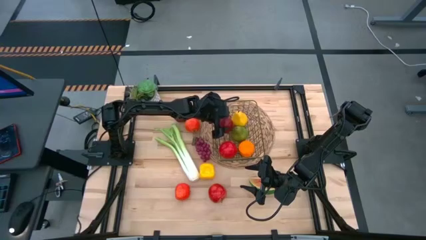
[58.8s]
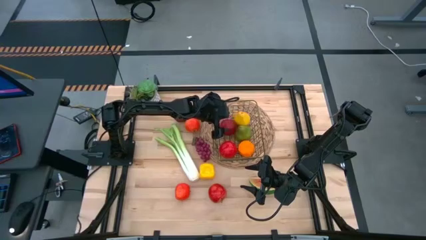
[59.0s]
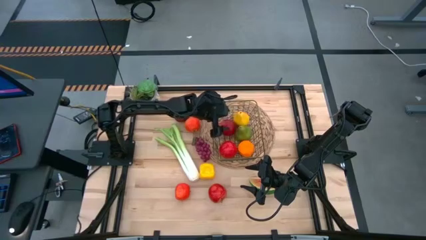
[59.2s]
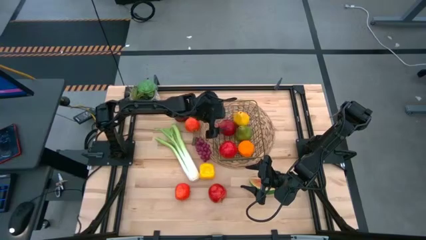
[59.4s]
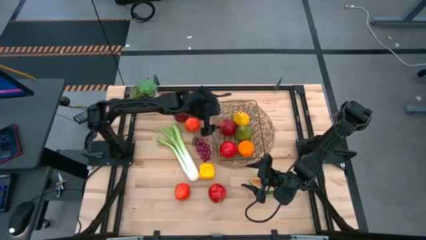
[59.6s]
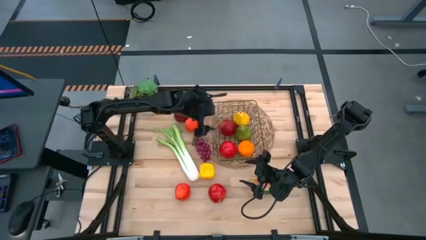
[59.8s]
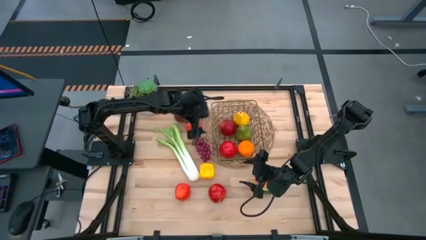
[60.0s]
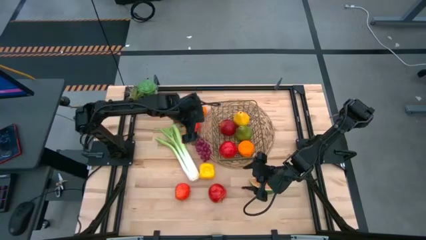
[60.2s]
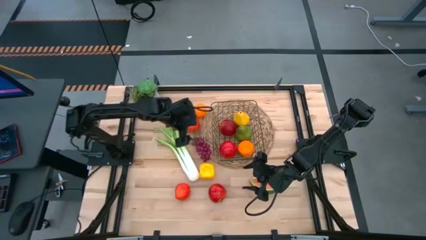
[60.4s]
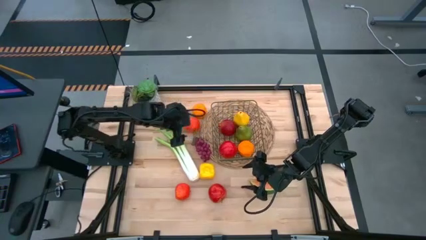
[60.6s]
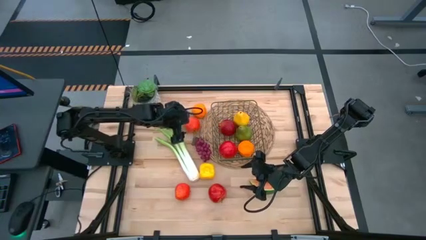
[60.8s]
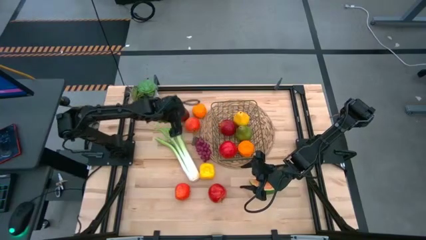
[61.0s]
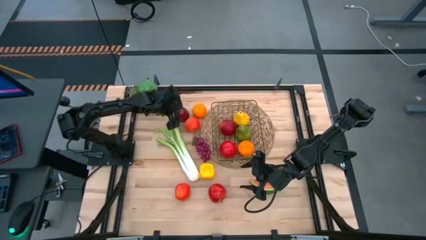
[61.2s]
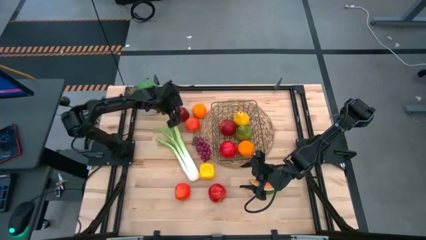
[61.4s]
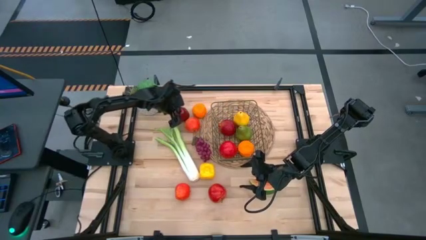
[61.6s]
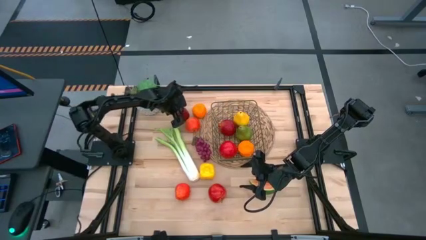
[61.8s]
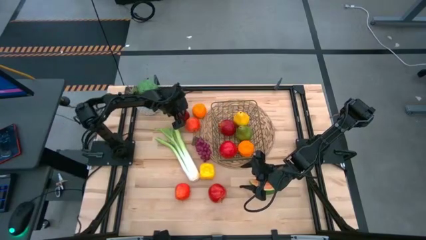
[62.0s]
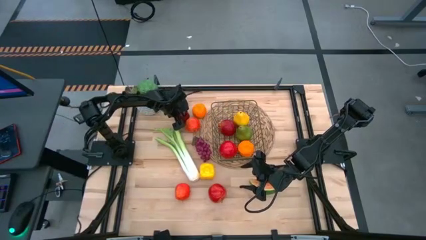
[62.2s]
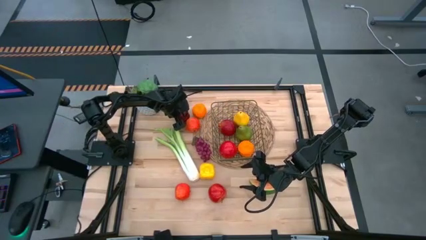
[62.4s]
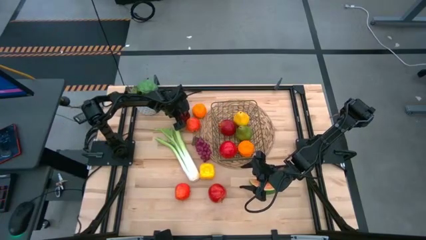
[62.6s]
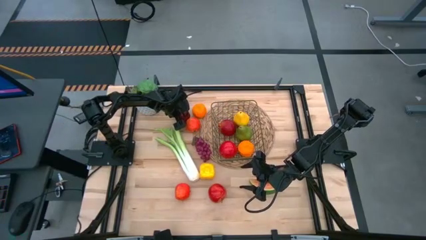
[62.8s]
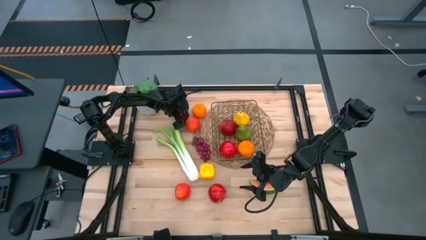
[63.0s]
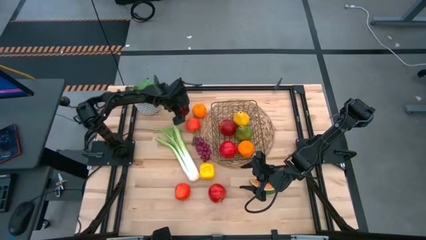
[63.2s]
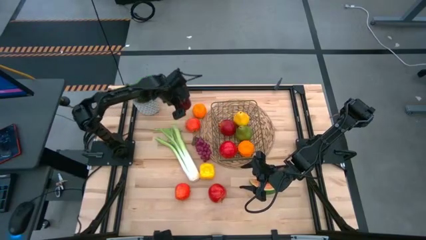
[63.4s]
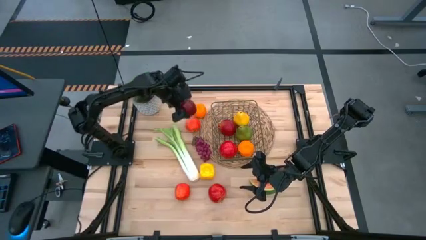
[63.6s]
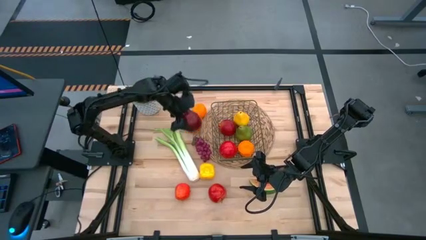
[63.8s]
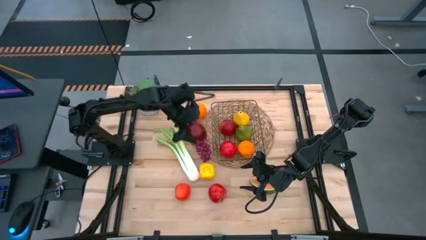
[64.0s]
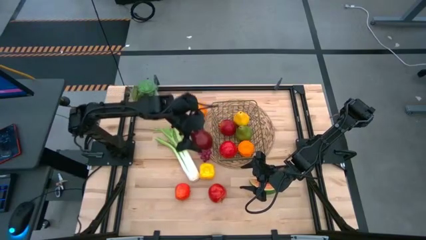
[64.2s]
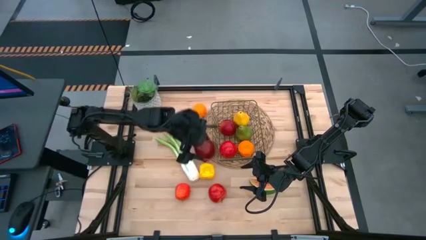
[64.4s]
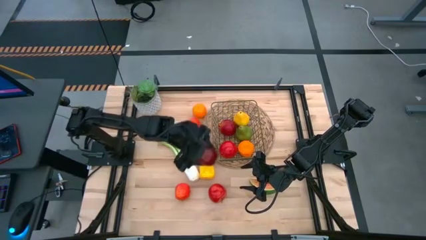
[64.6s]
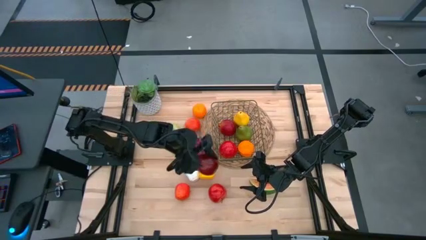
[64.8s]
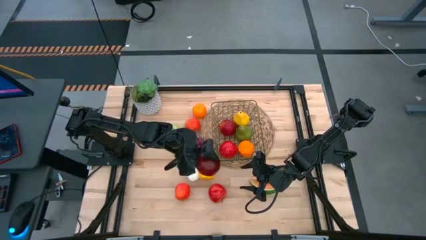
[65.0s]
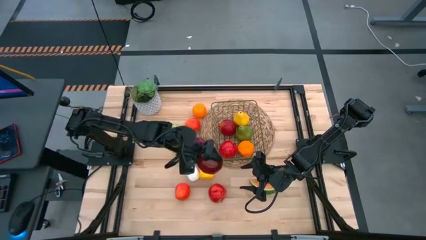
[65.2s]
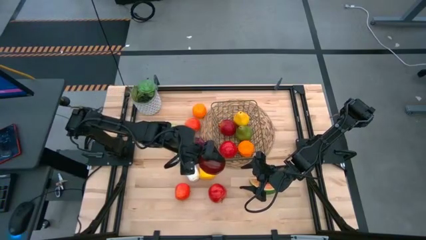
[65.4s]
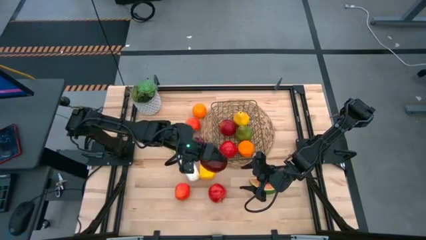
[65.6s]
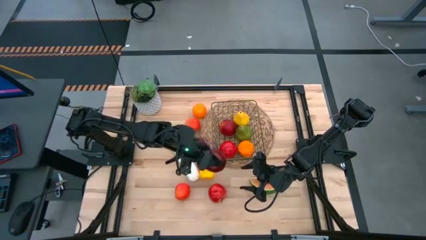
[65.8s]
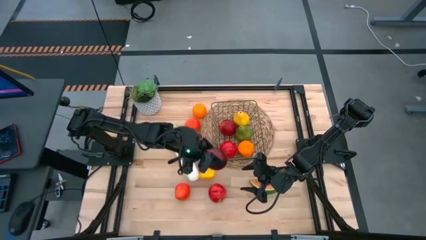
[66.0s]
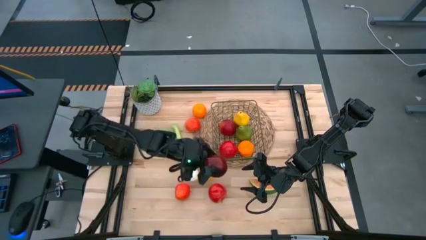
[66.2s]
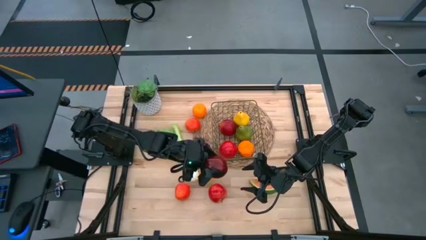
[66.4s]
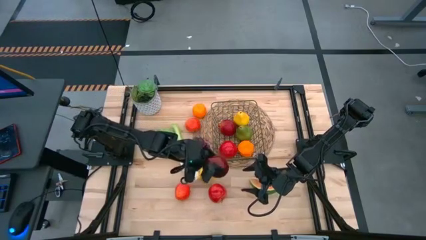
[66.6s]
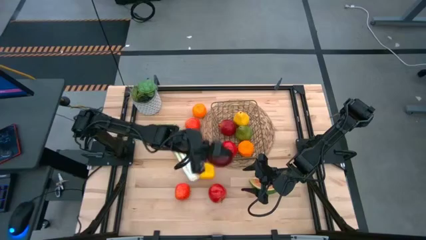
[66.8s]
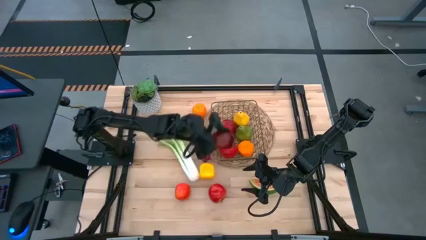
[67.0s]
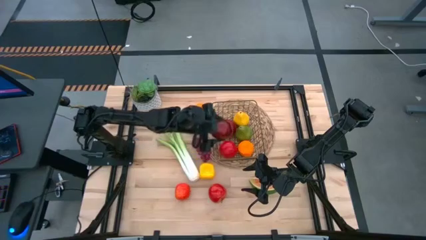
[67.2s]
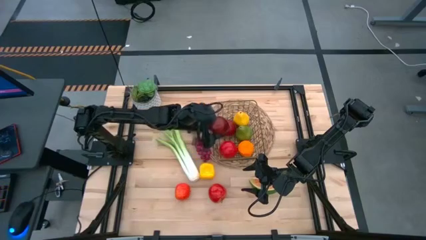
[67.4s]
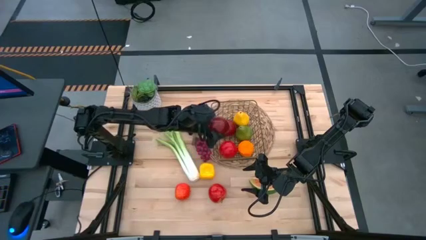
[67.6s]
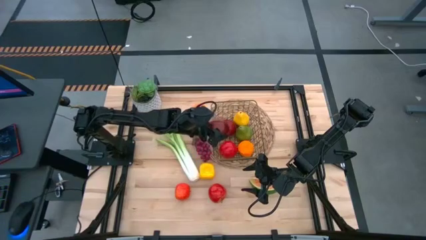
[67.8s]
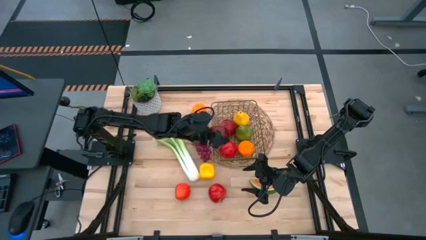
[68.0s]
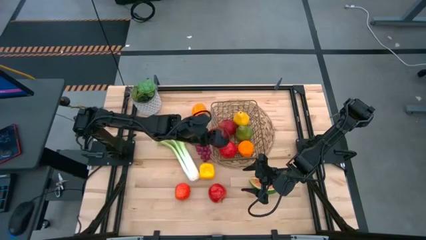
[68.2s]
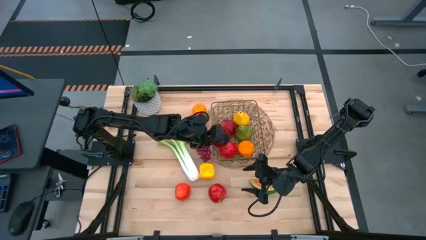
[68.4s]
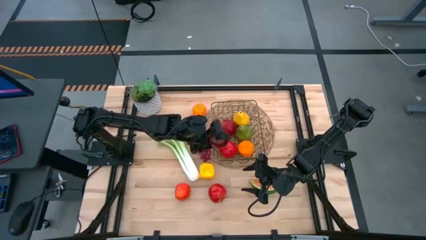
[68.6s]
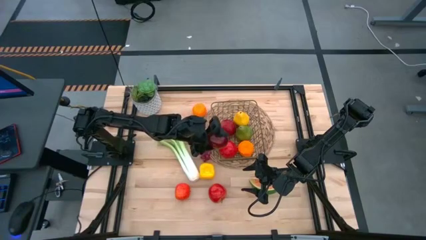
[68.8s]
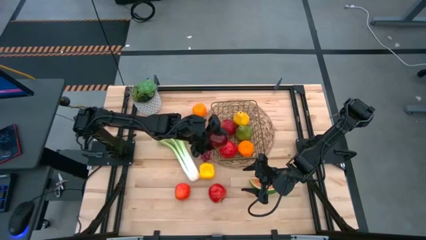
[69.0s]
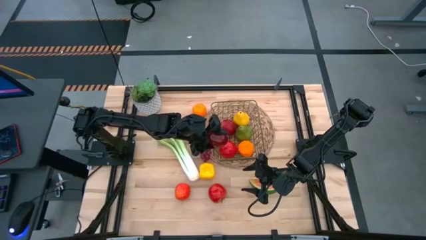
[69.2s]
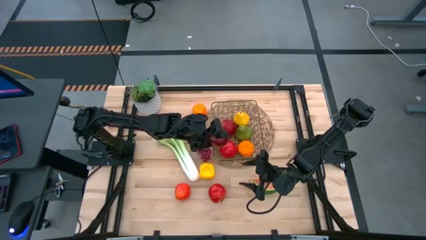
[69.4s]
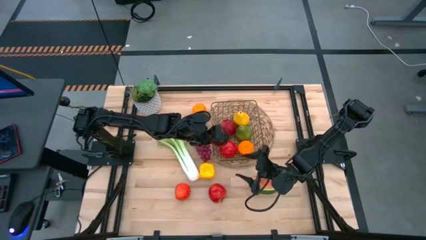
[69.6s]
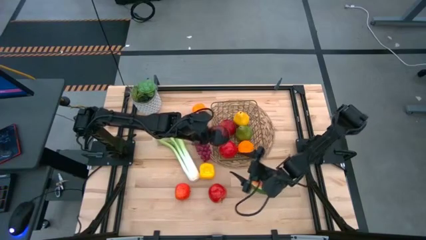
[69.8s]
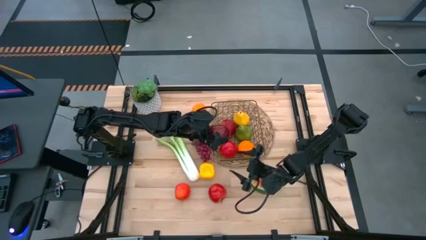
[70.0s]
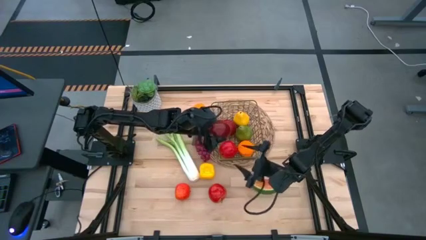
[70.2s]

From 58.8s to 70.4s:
Task: Build produce basket
Put the apple into the wire basket

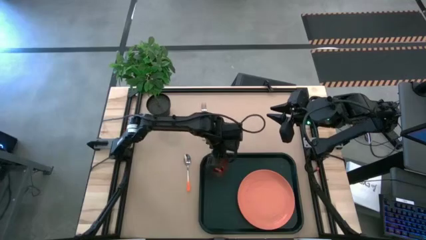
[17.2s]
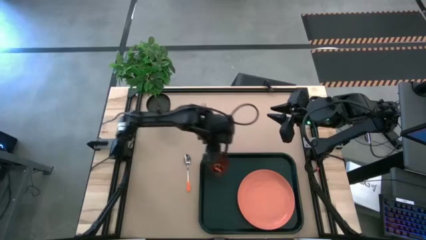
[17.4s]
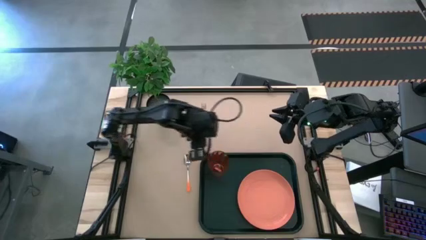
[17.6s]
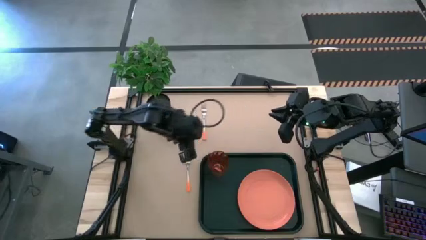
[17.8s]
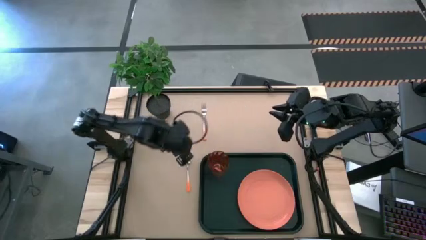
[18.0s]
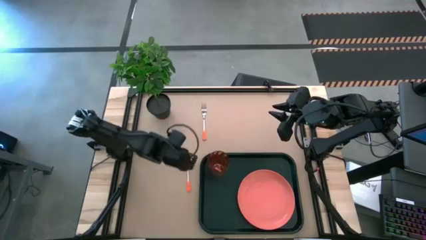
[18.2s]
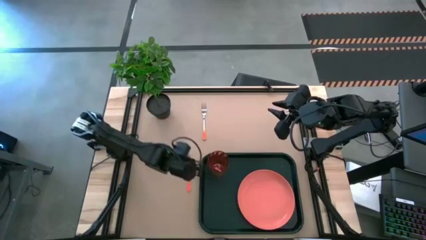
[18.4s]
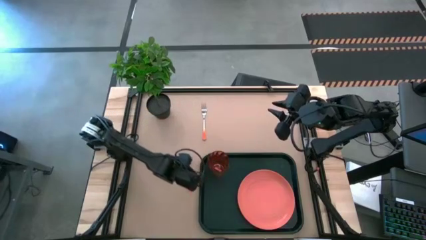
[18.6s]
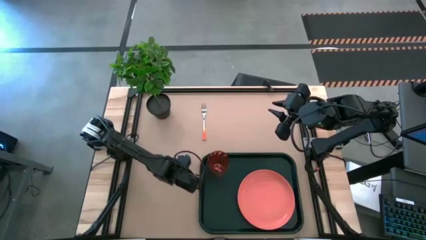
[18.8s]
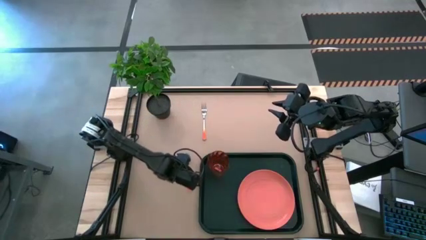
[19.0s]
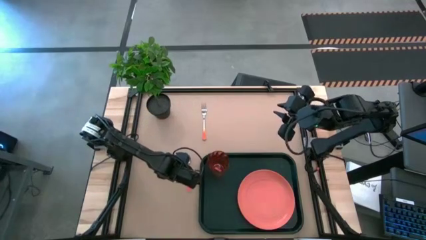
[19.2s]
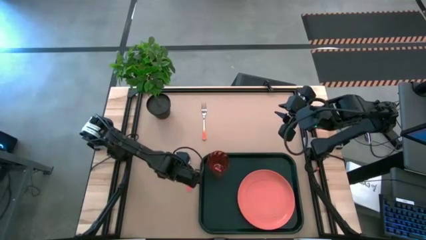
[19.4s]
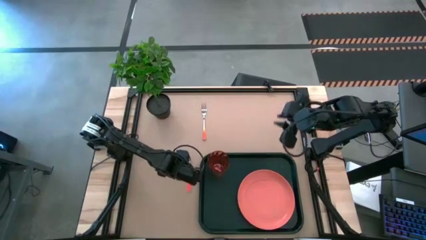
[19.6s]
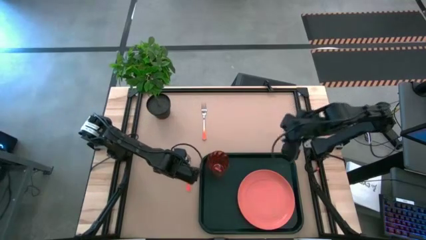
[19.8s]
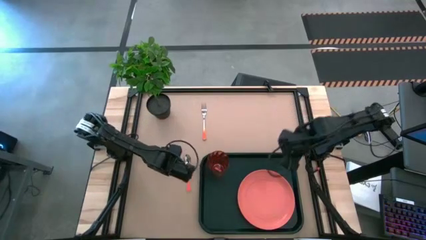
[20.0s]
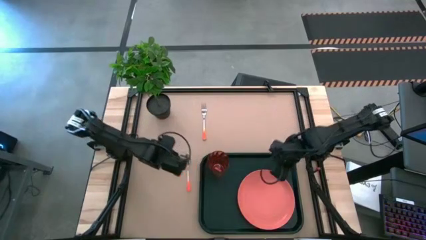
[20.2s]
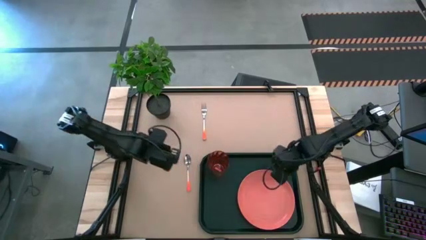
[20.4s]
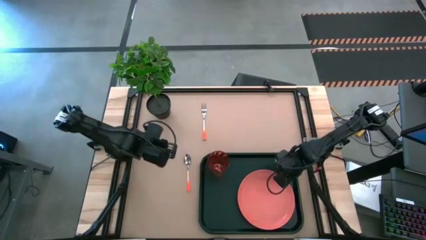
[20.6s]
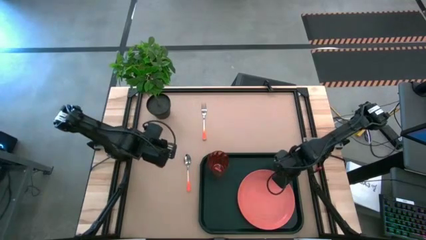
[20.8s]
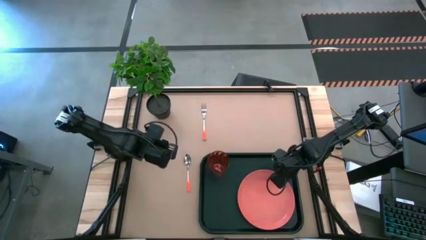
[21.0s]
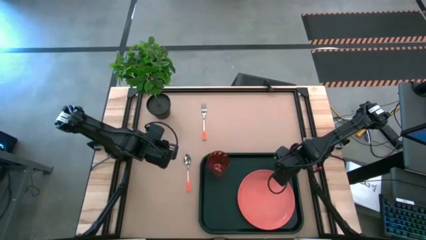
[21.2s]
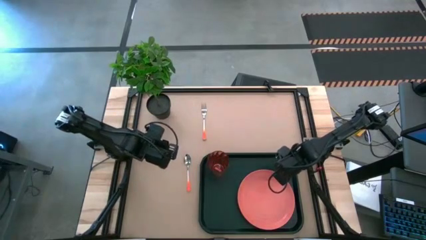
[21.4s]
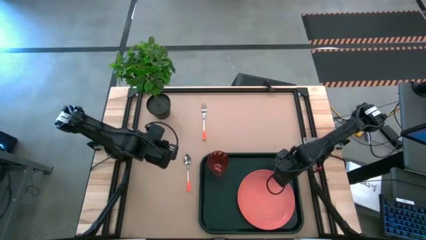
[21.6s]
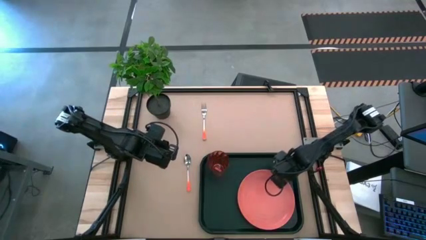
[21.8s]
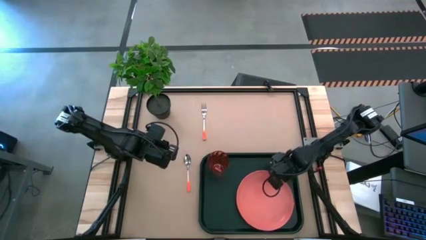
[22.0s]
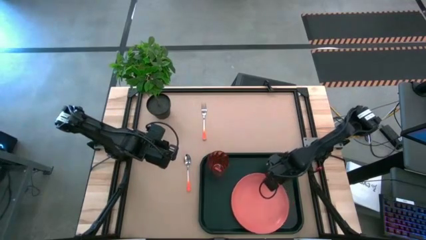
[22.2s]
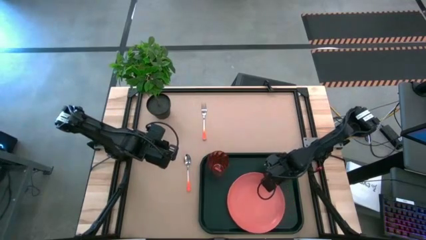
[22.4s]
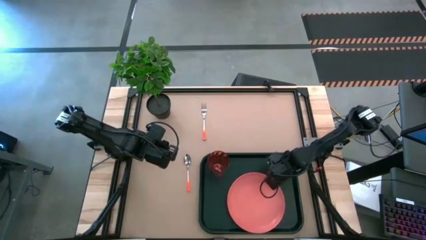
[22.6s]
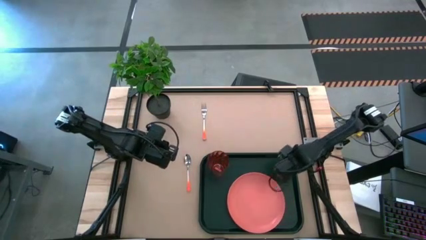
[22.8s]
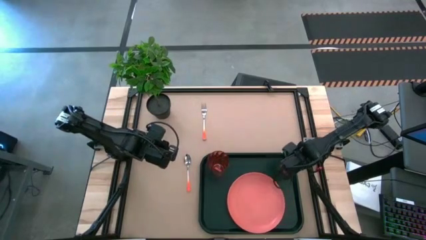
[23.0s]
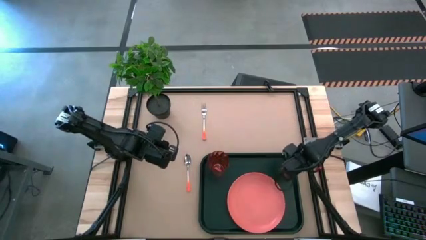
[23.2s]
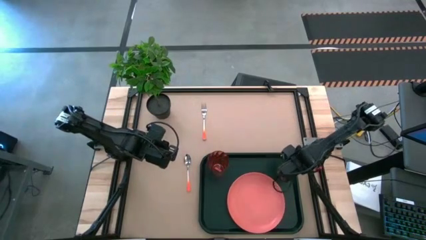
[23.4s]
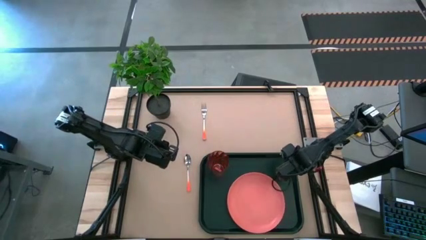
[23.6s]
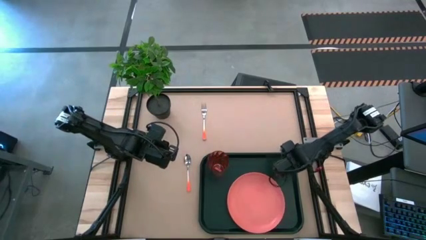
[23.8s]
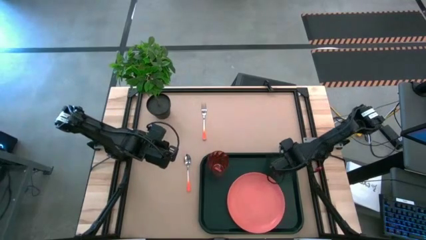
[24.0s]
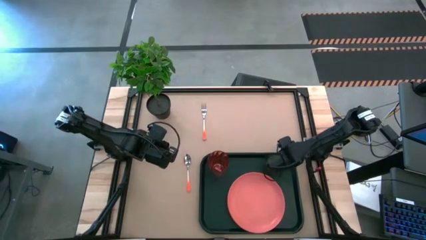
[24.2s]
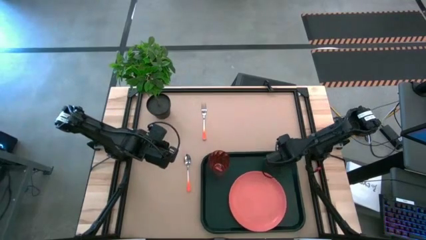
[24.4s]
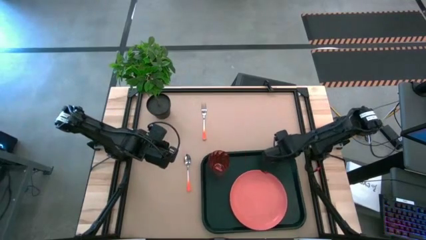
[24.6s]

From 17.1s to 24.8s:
Task: Pick and place plate/cup/fork/spoon on tray
Adjust the black tray
